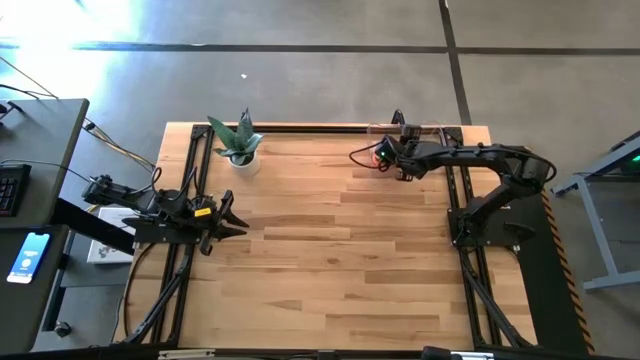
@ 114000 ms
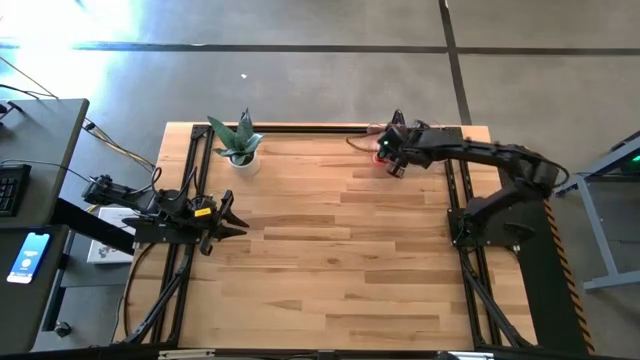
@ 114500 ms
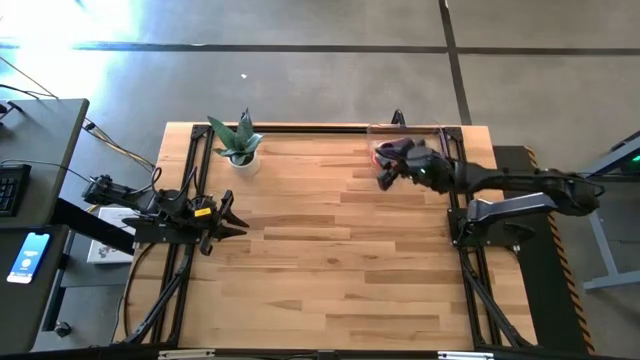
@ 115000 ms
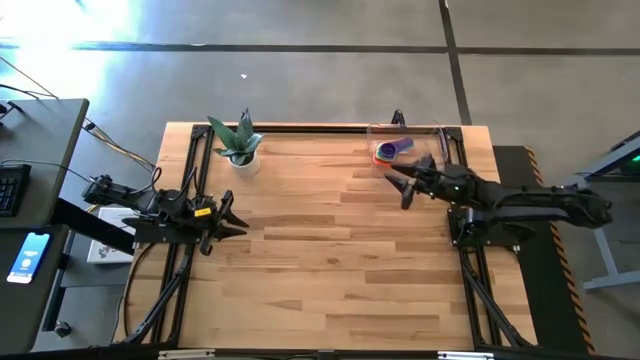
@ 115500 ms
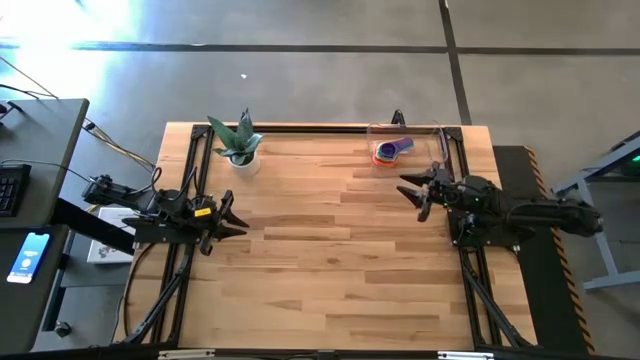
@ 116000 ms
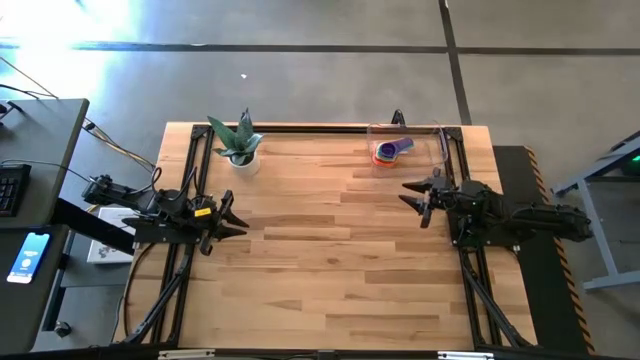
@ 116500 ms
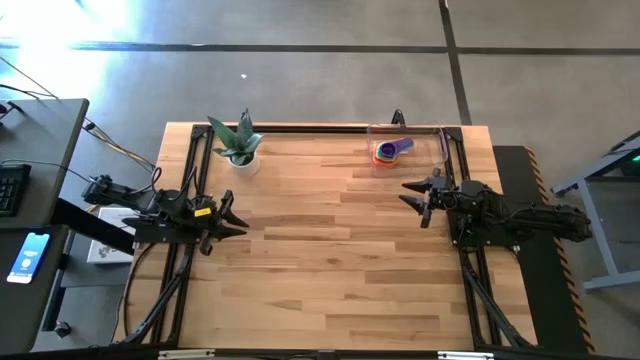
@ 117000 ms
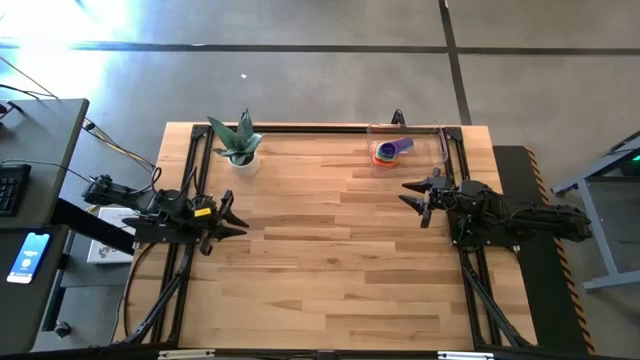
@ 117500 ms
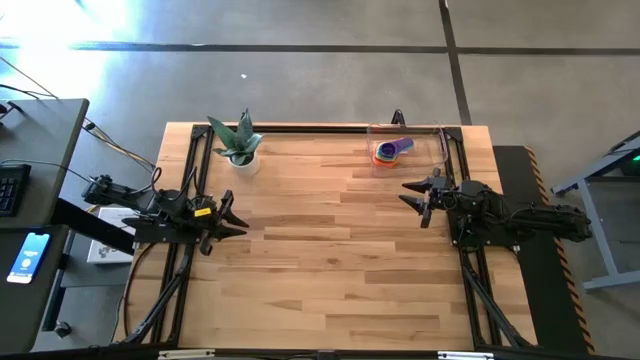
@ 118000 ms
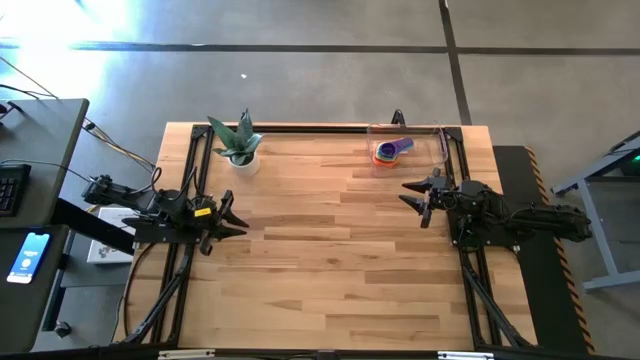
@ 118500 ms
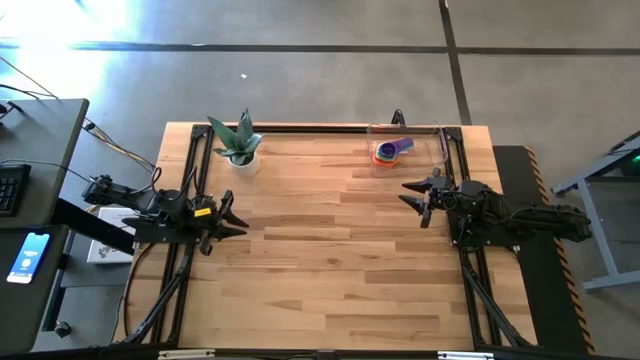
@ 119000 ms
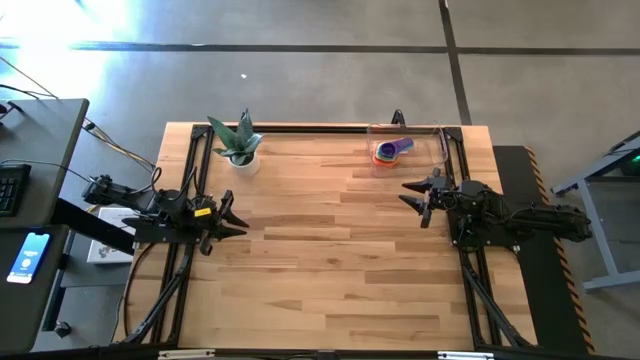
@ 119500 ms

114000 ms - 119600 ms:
Task: Nest measuring cups in basket
Return to Home Position

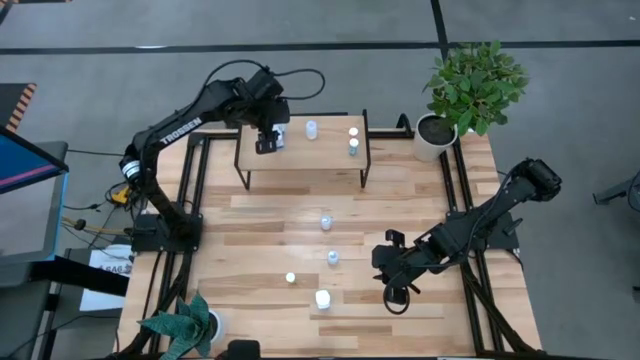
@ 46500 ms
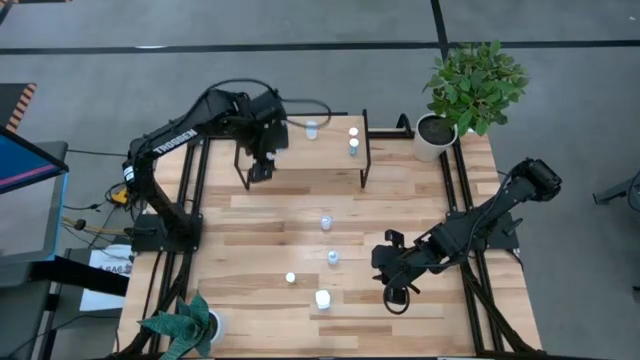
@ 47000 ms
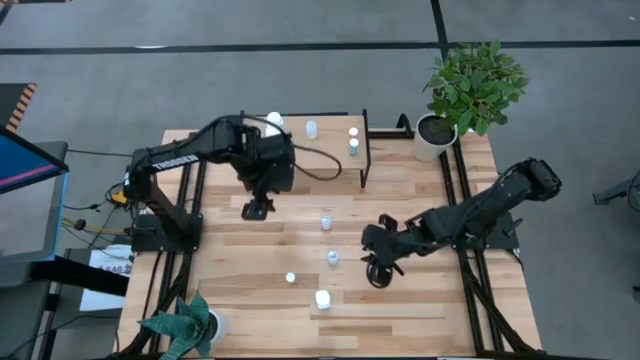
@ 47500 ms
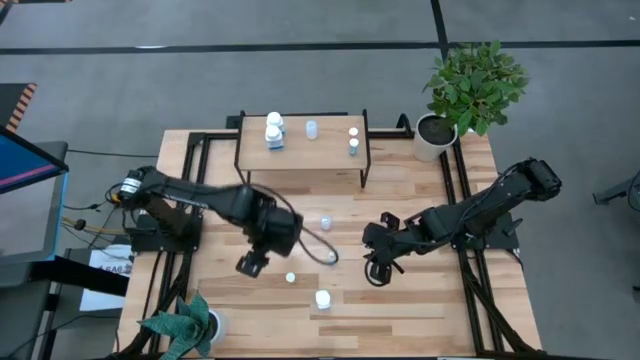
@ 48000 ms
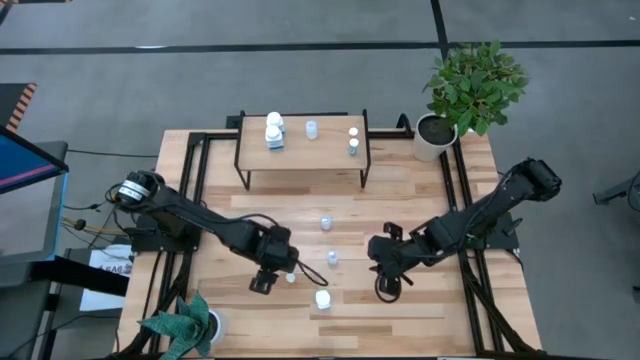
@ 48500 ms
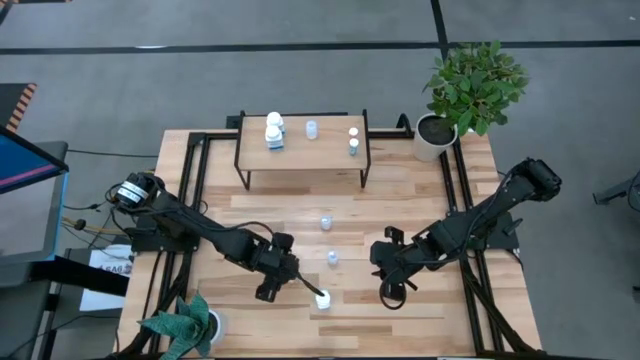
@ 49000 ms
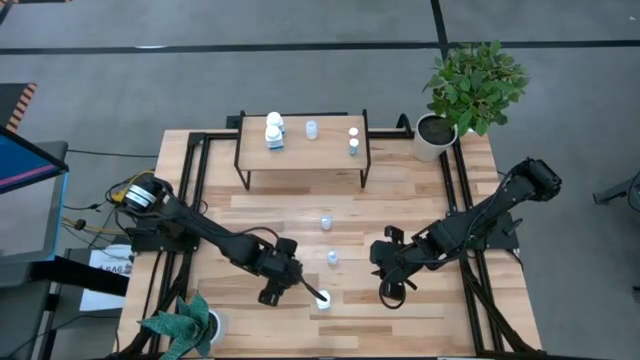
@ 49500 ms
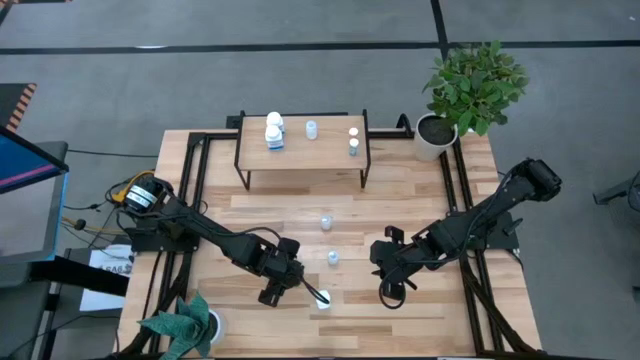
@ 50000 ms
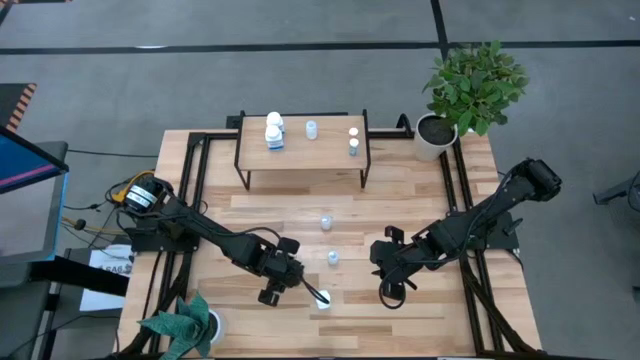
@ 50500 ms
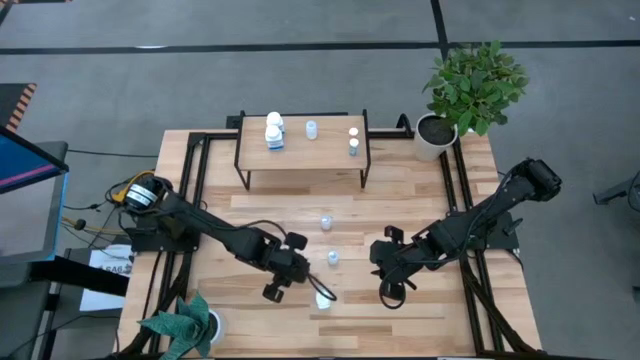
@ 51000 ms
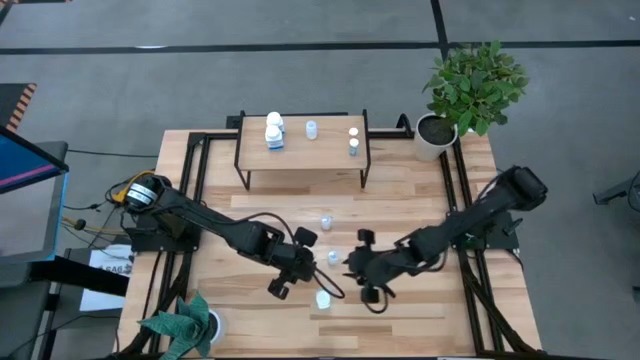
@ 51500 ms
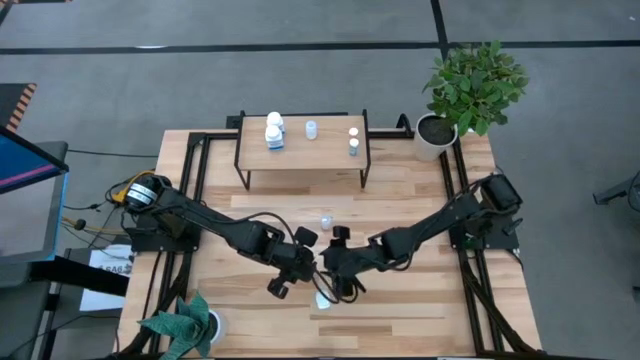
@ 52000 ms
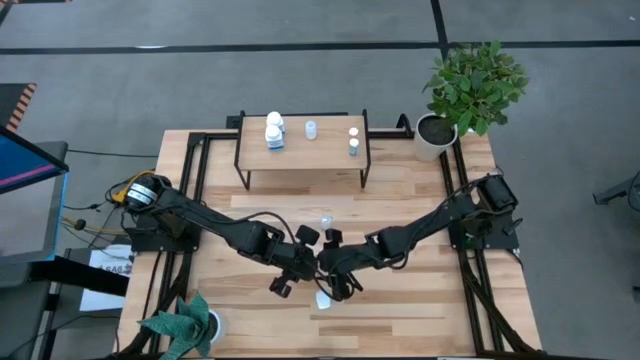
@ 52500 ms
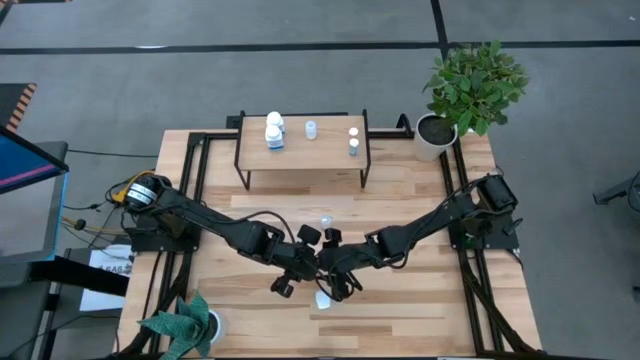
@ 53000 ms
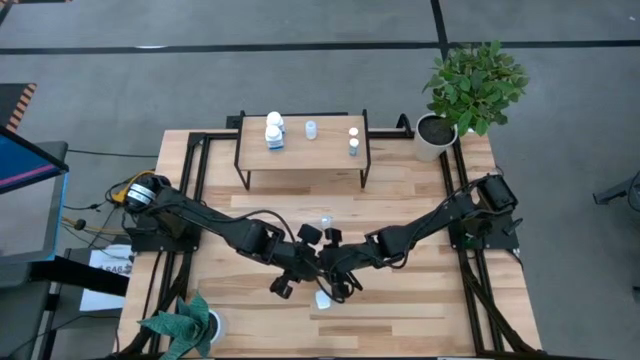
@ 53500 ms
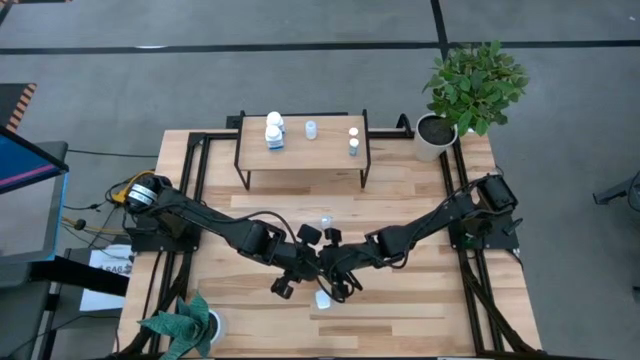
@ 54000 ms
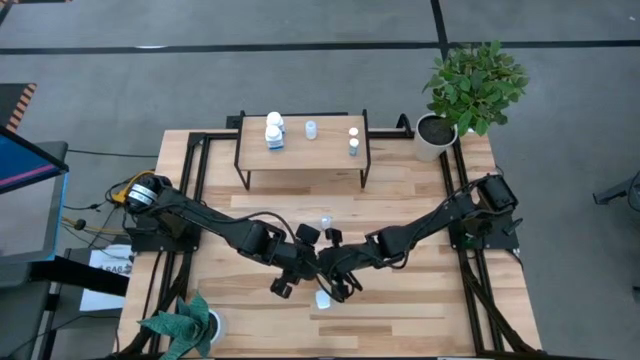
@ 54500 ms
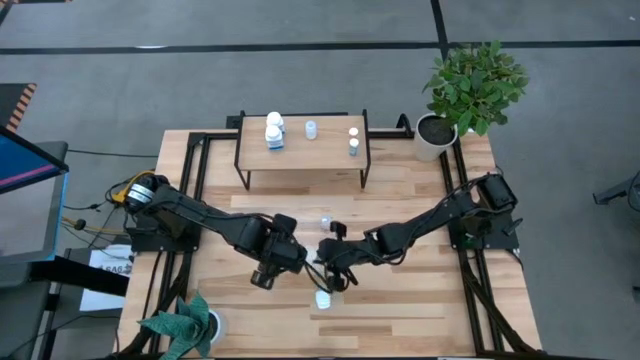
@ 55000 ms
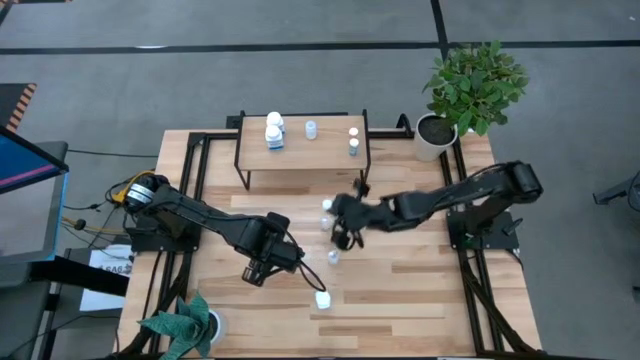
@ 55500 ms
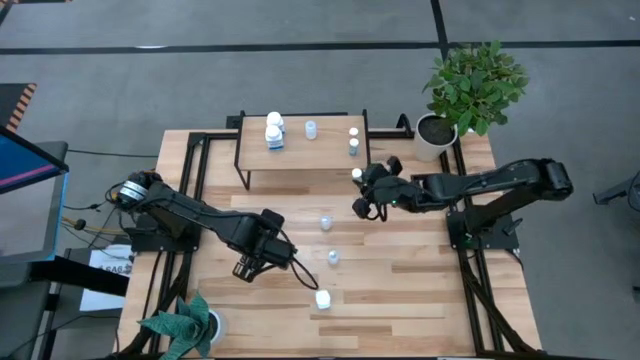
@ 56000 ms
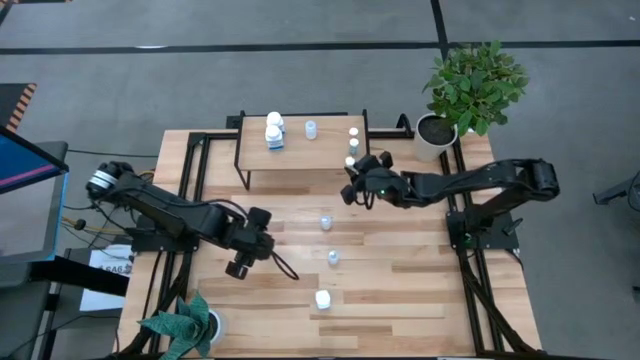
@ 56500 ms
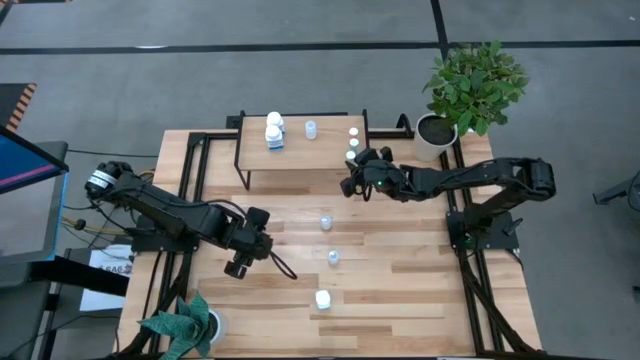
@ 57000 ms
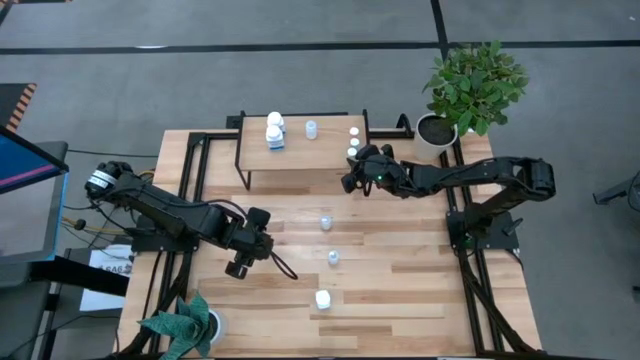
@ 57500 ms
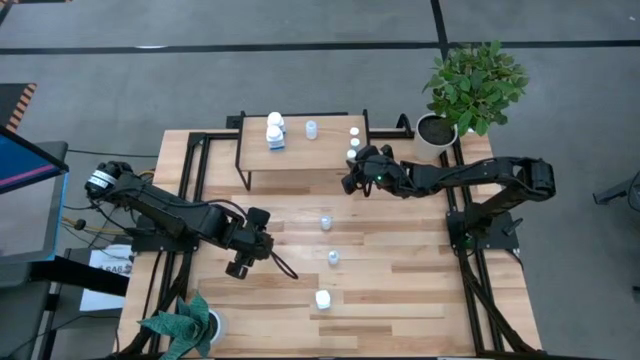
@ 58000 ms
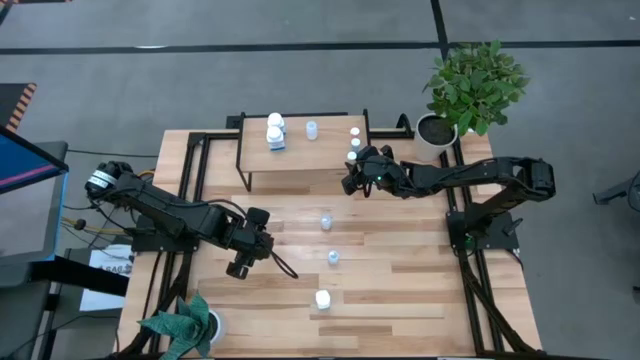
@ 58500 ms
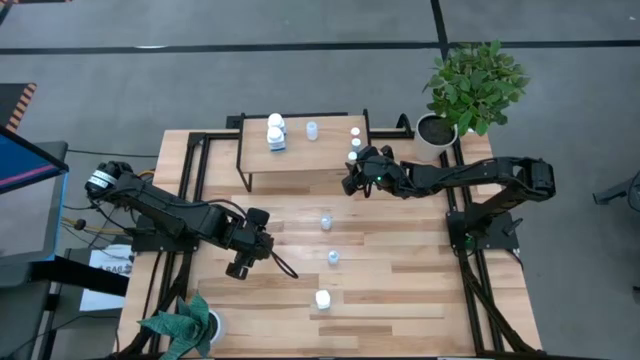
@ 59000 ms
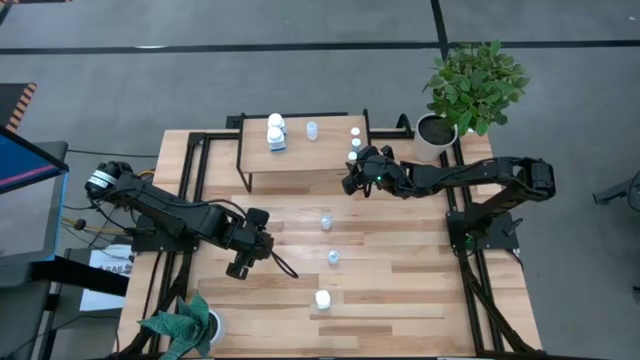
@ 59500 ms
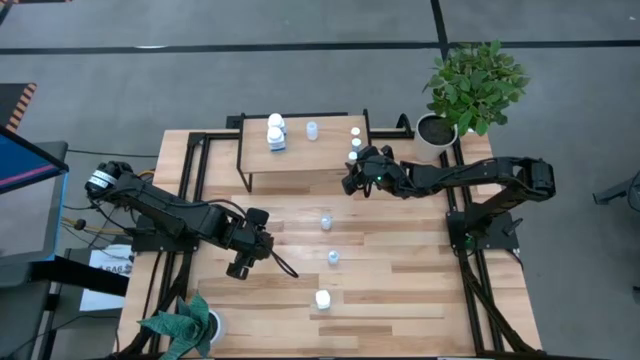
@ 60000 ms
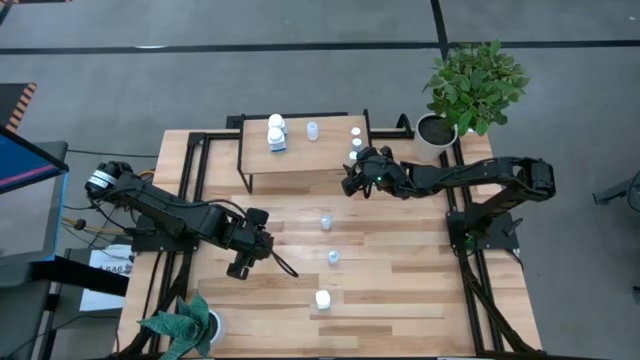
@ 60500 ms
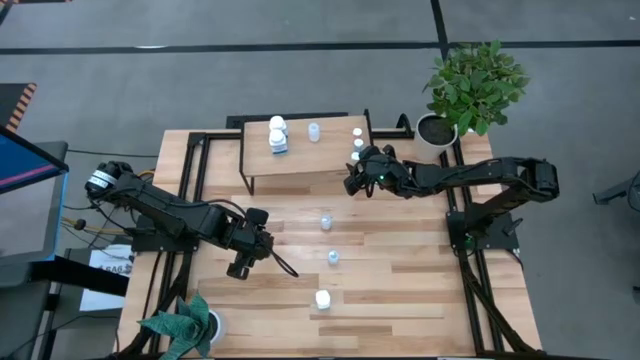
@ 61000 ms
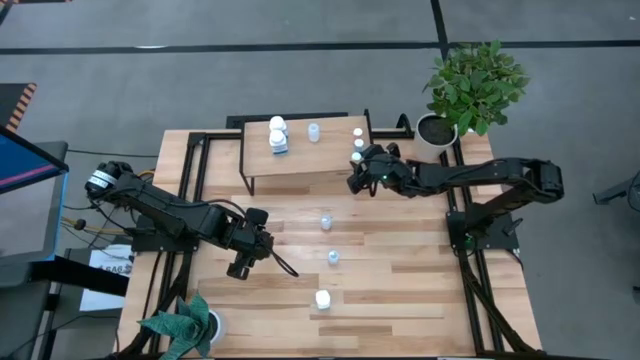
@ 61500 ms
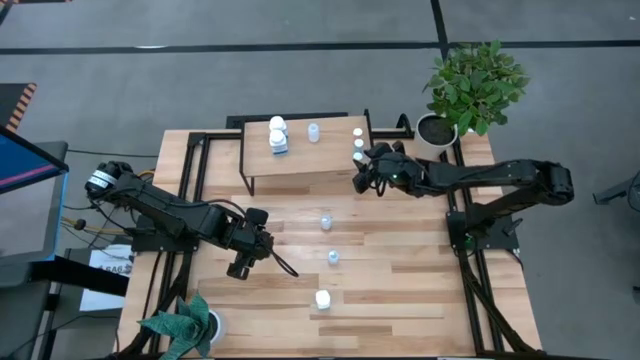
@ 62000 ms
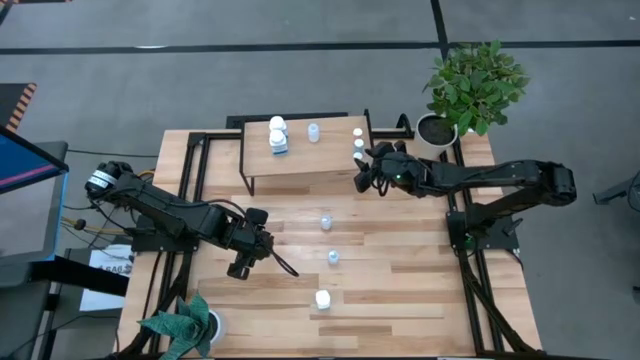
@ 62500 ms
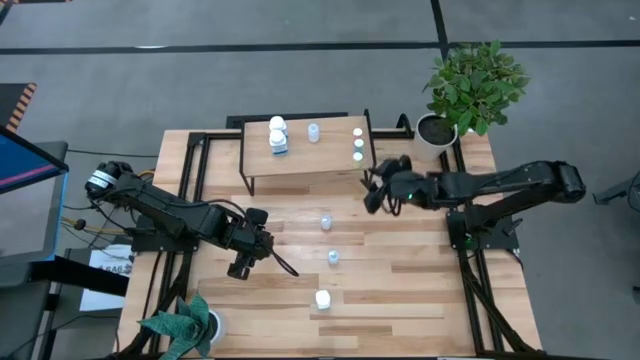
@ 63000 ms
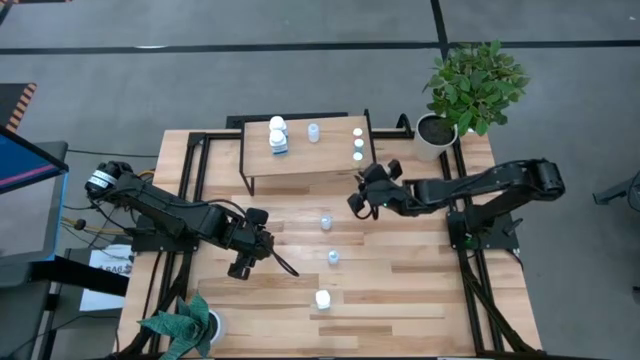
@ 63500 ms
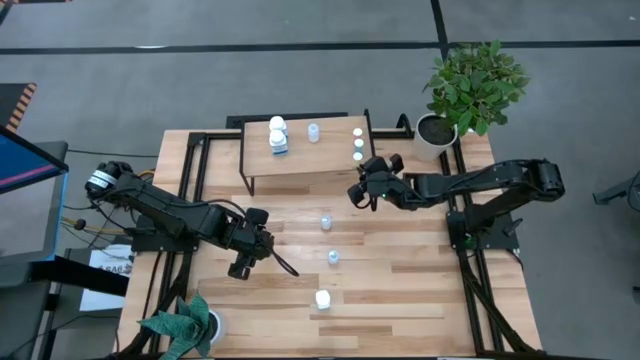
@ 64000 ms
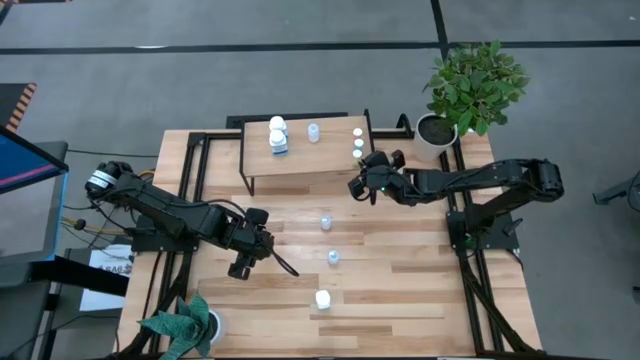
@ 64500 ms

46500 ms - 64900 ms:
Task: Pick and place medicine bottles onto shelf by color
Put the yellow pill bottle on the shelf
